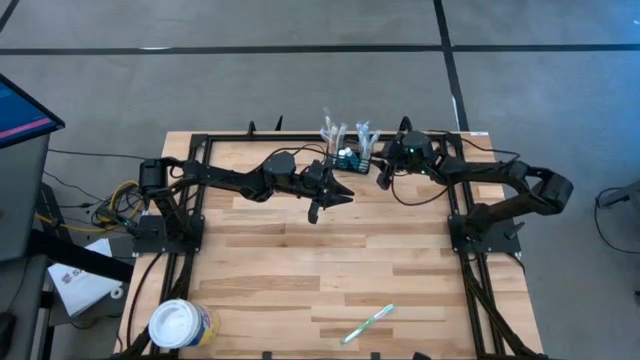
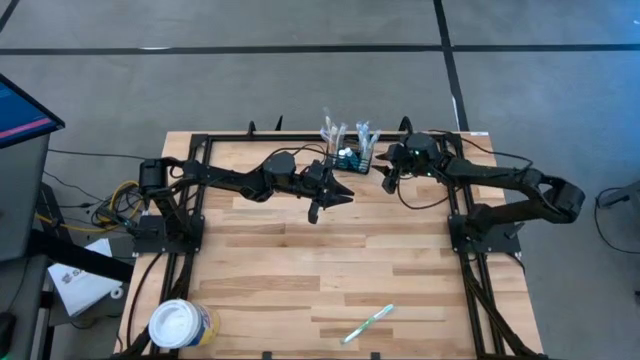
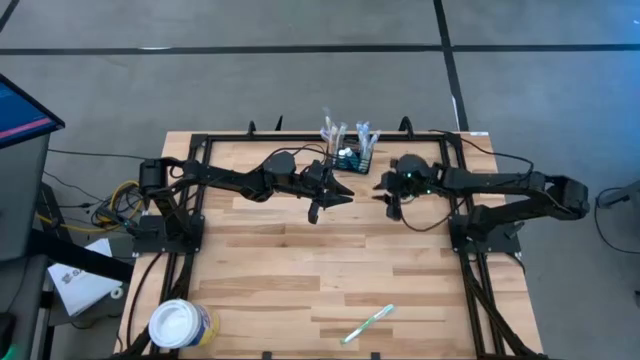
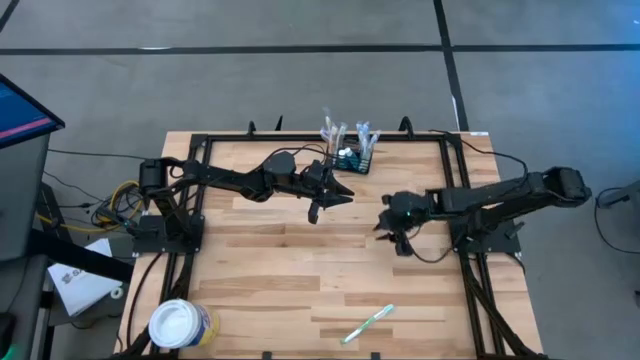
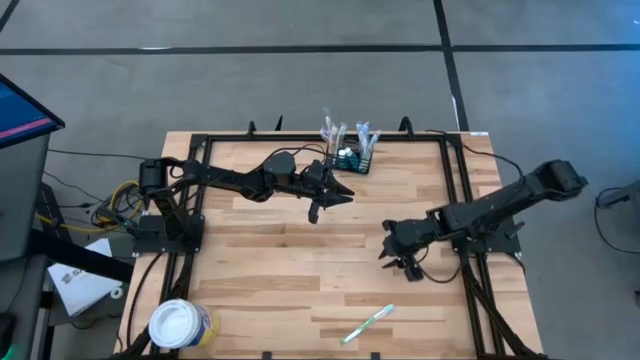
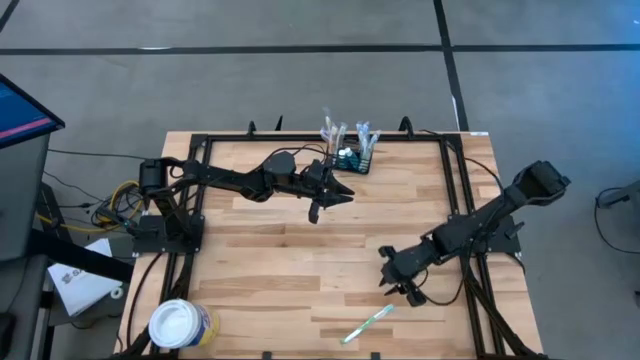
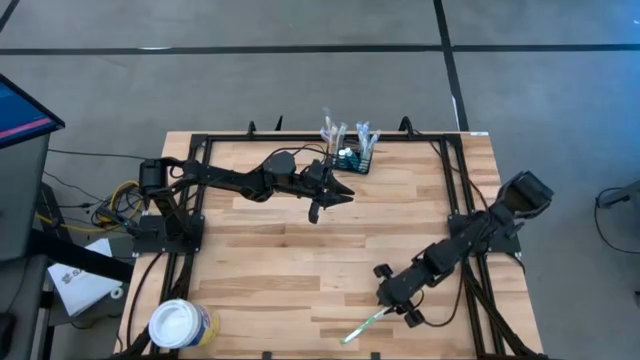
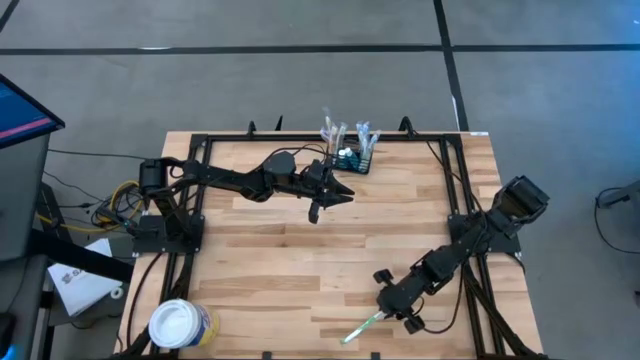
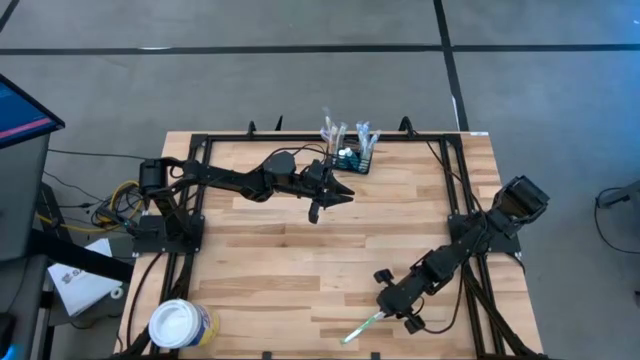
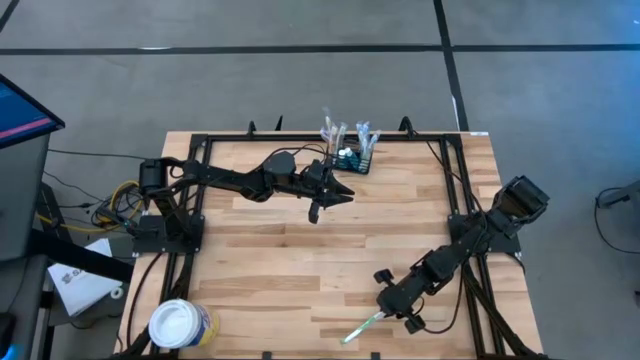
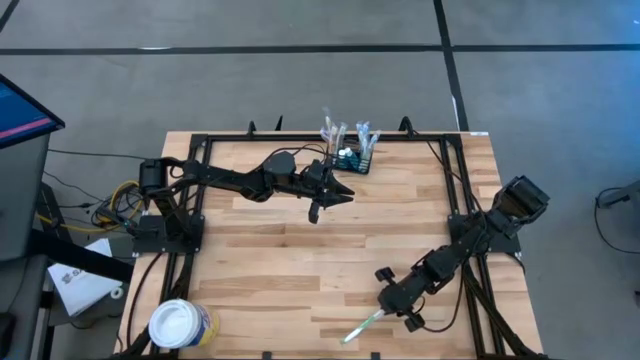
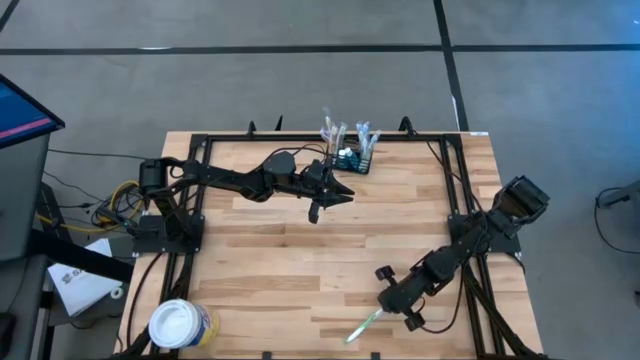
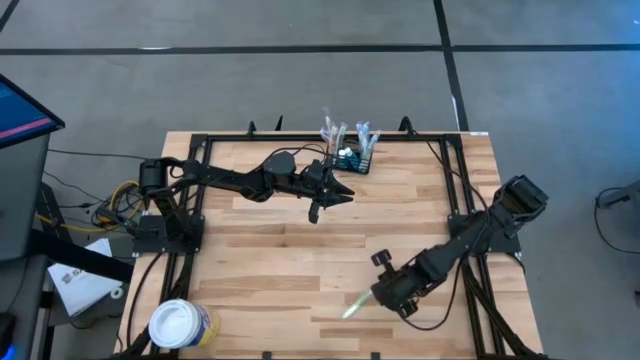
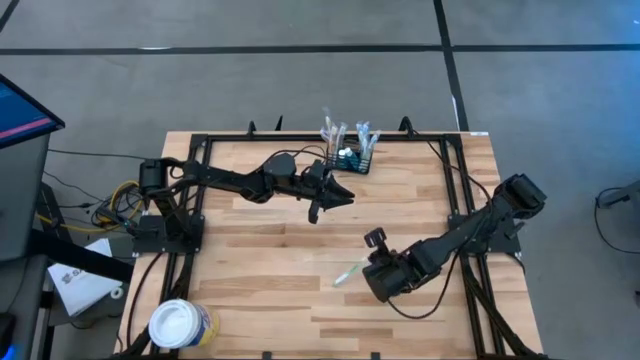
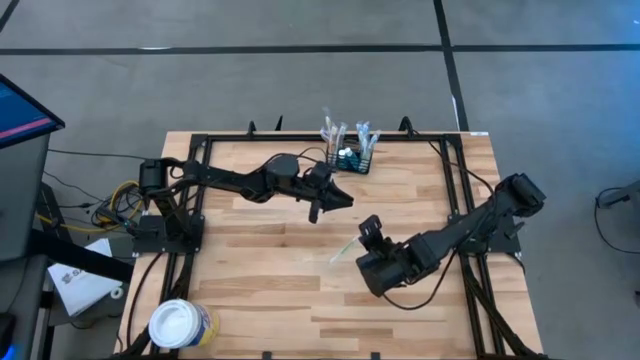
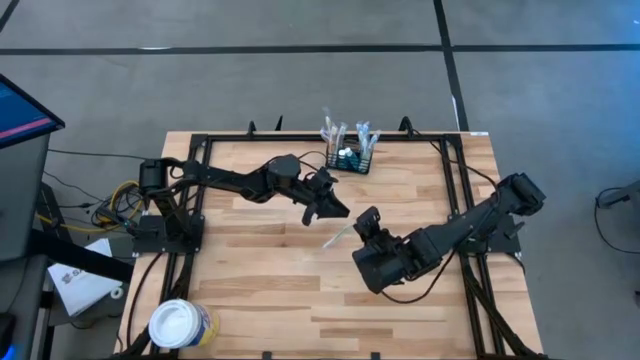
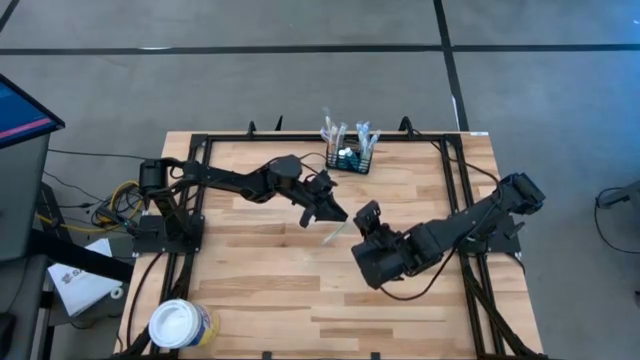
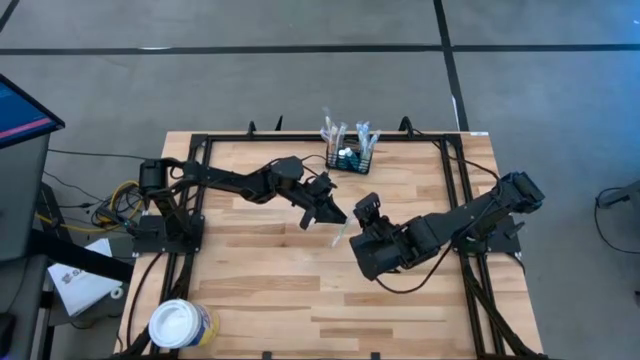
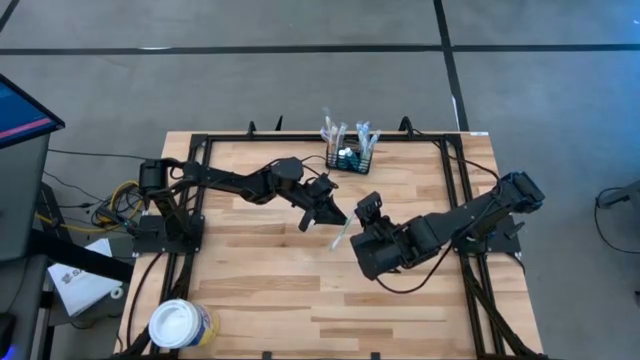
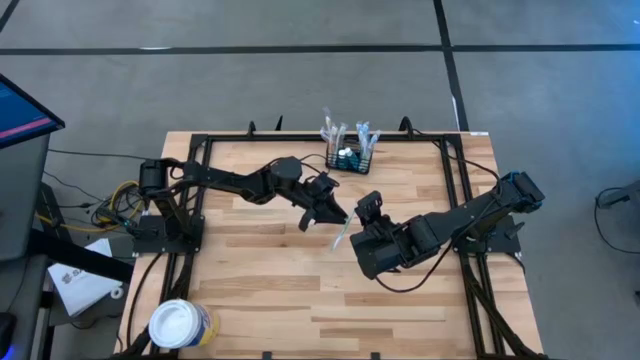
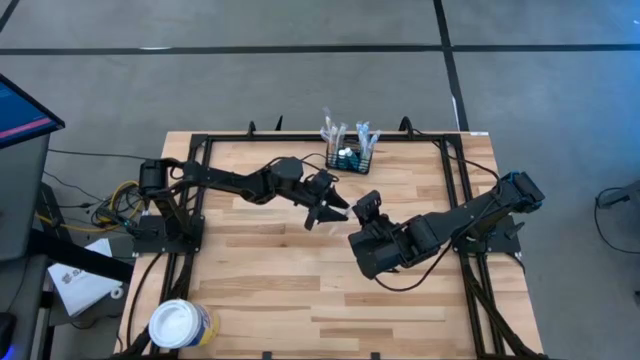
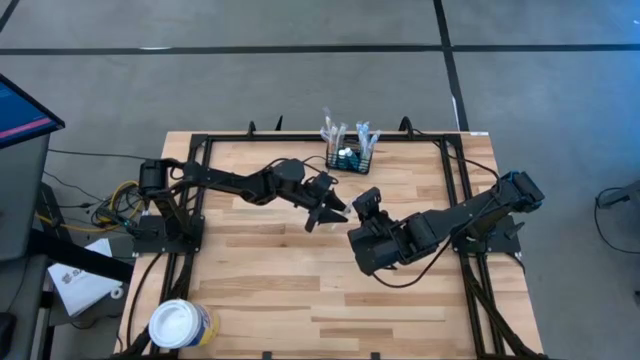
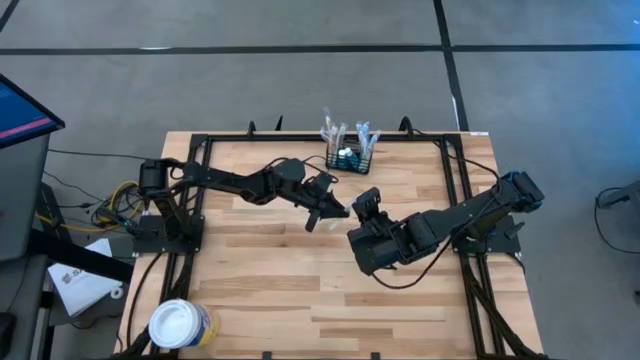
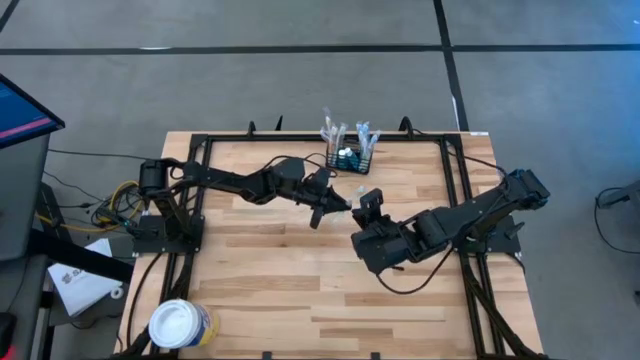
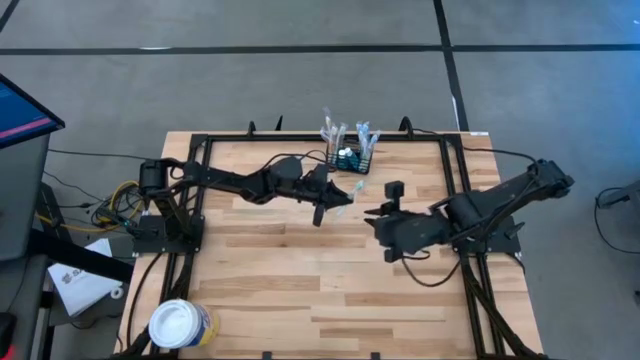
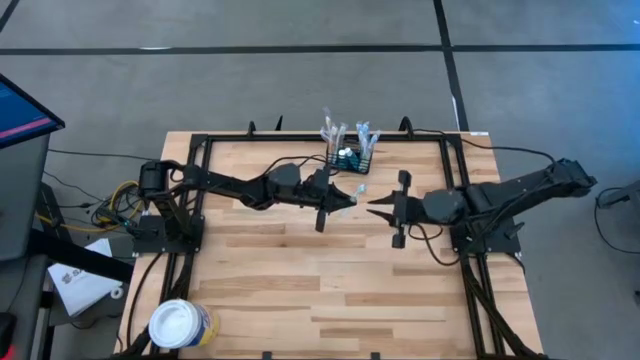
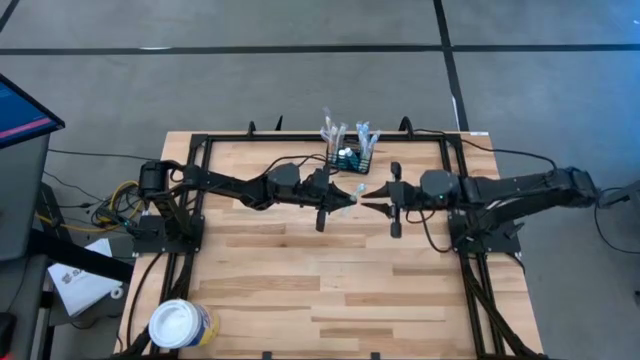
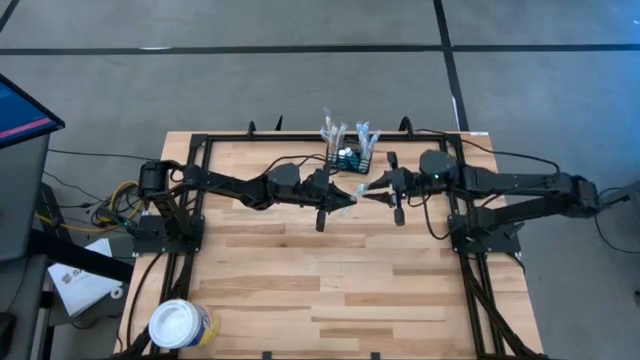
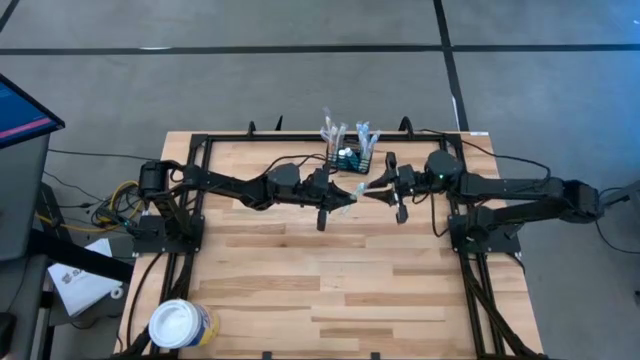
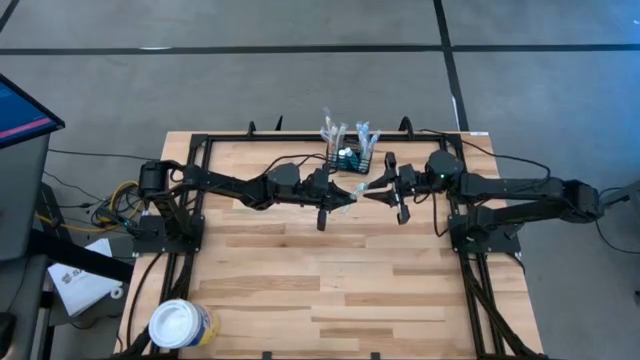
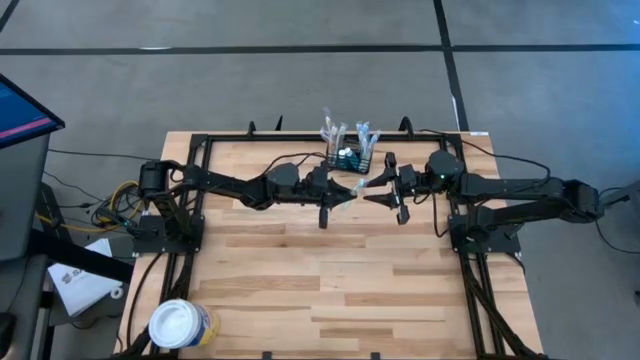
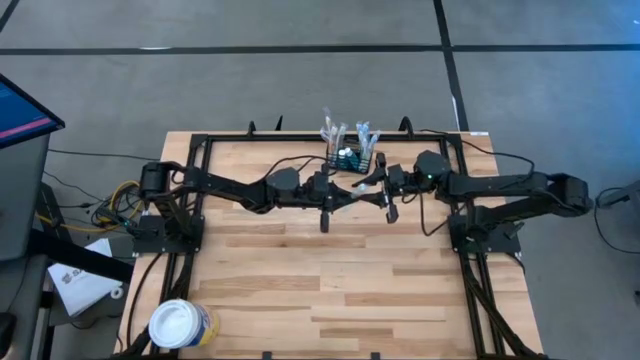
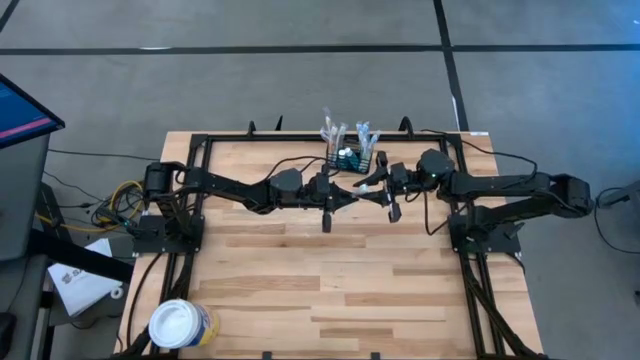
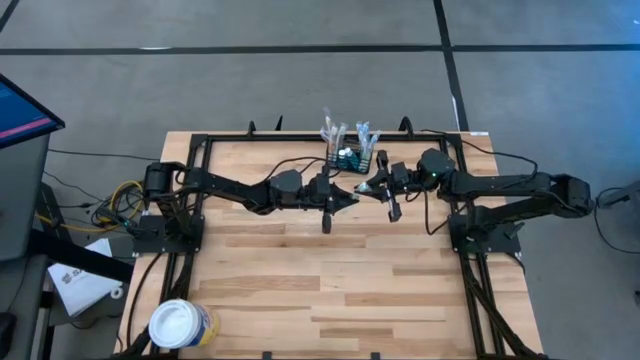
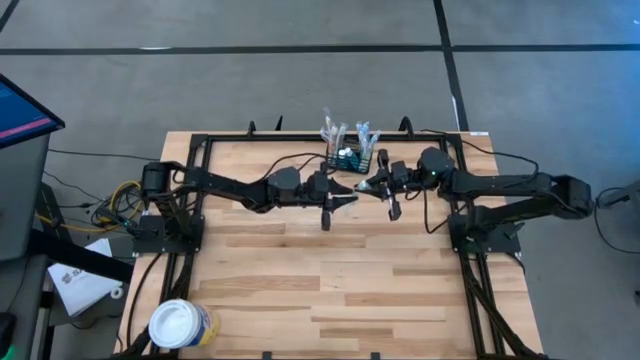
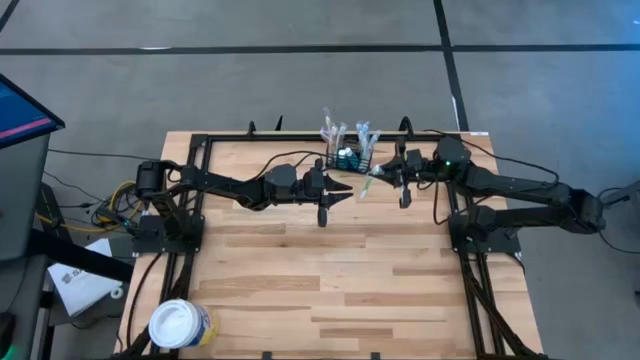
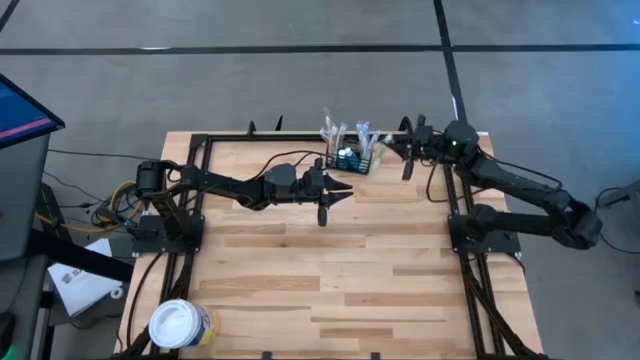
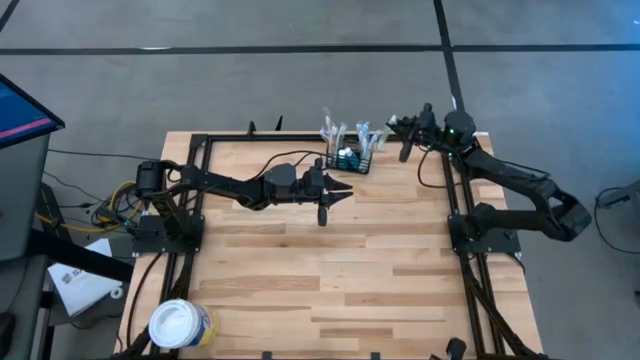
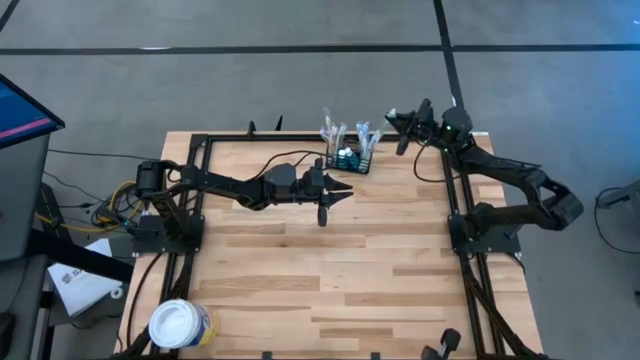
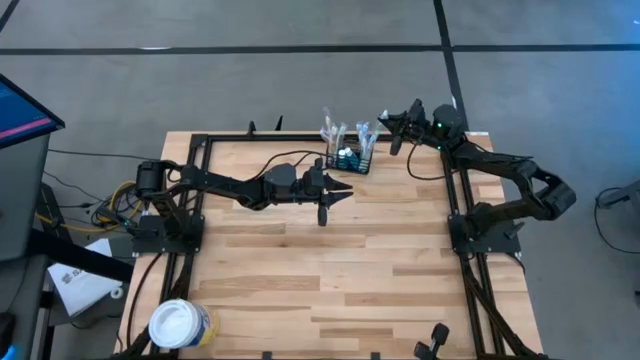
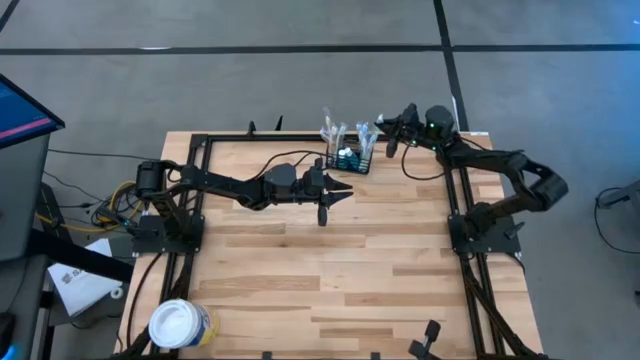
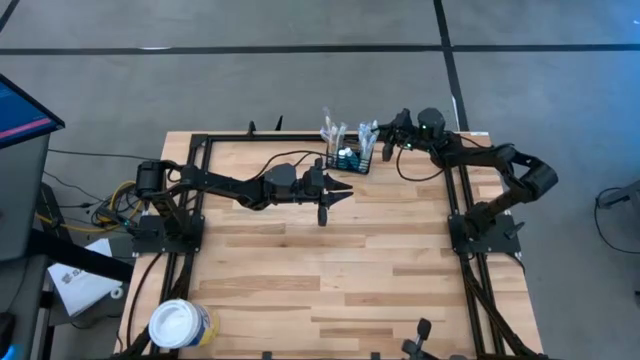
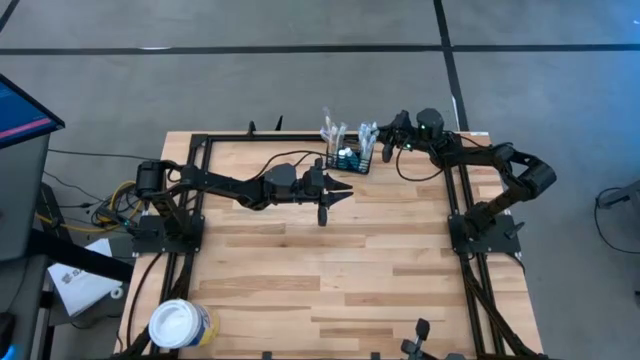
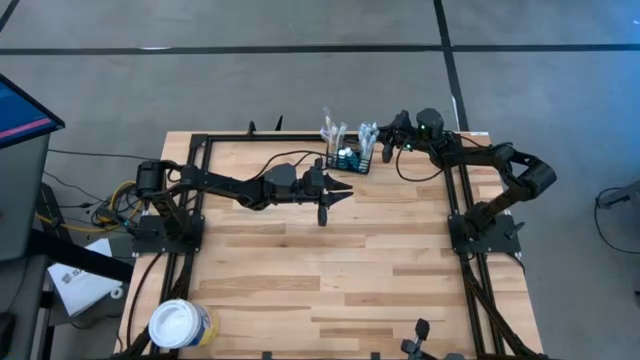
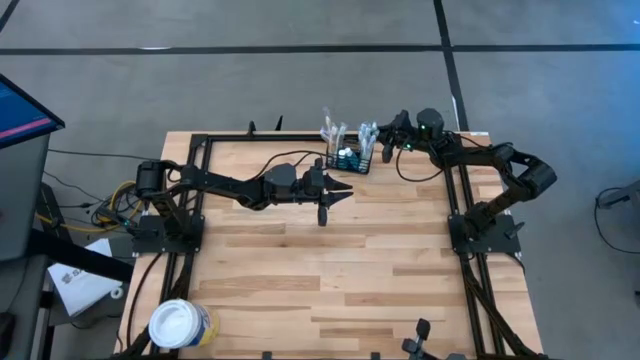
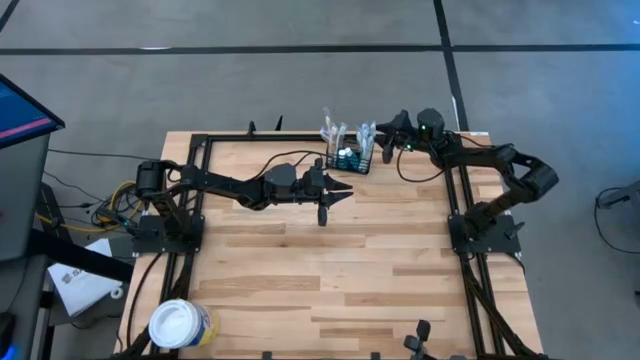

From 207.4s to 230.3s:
Task: Pick & Place toothbrushing station
Put the green toothbrush into the mesh organizer
